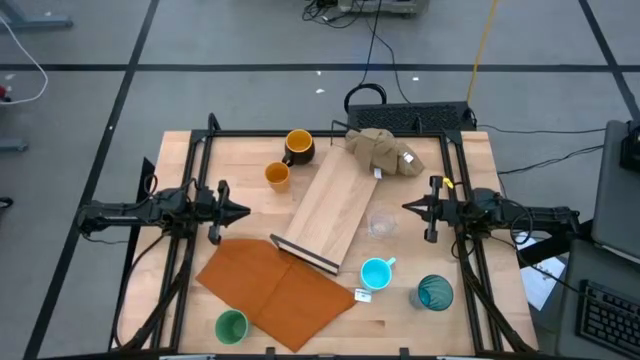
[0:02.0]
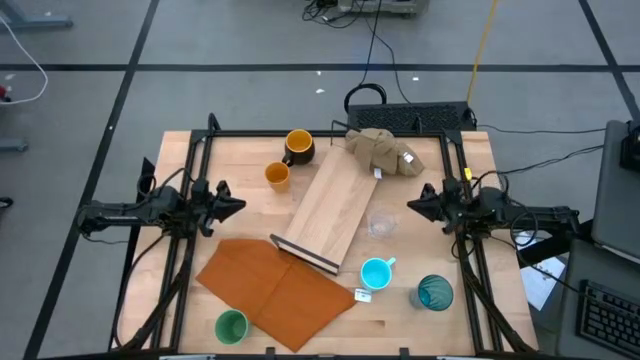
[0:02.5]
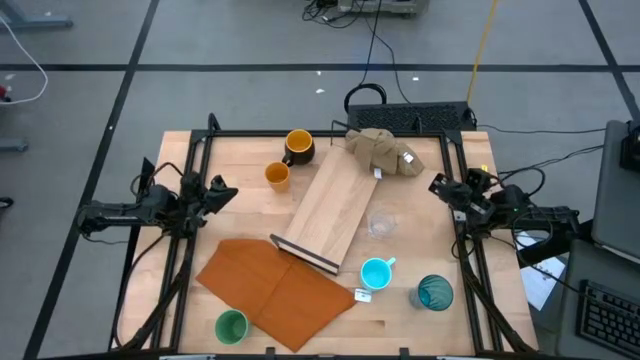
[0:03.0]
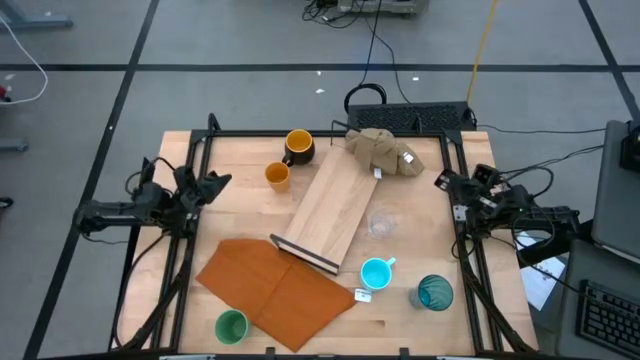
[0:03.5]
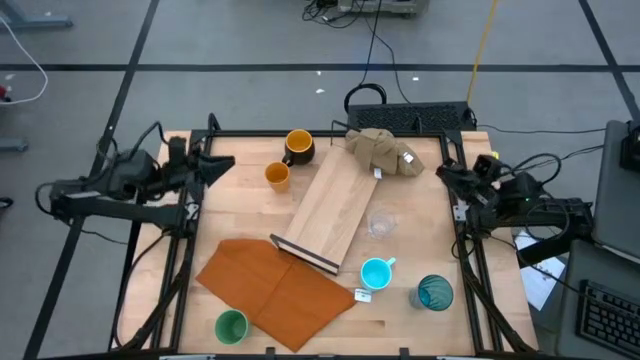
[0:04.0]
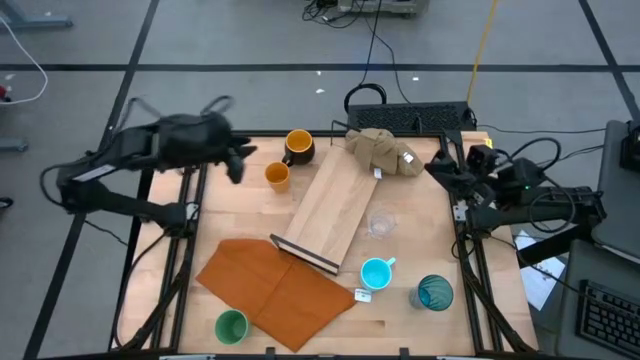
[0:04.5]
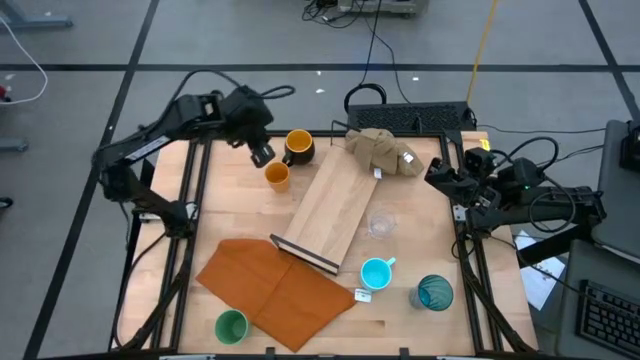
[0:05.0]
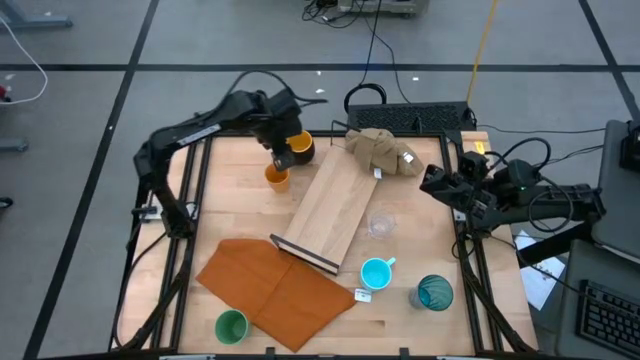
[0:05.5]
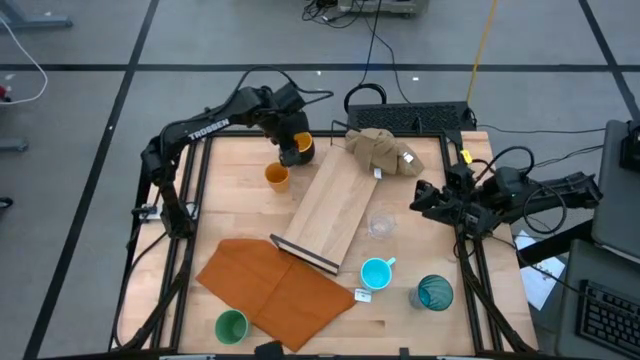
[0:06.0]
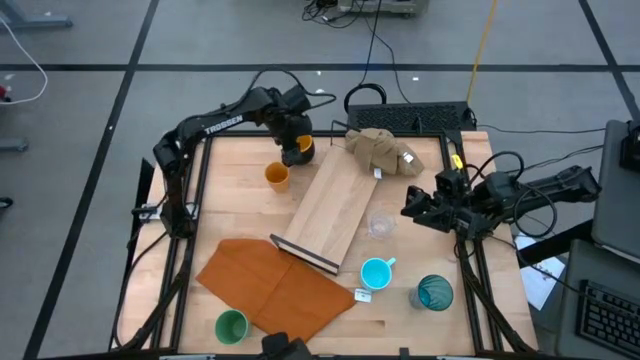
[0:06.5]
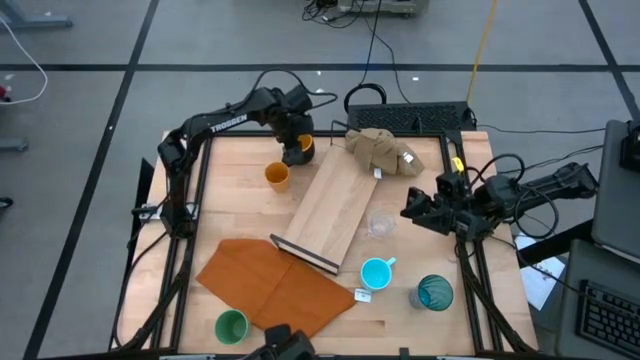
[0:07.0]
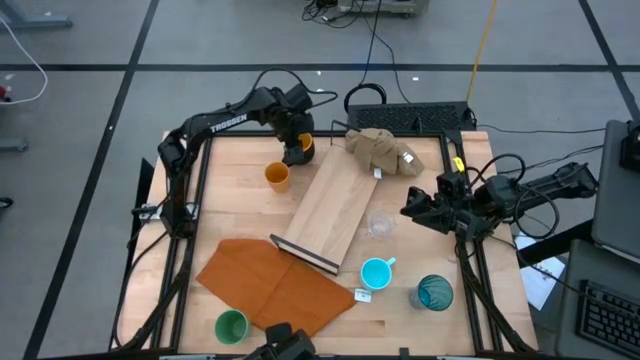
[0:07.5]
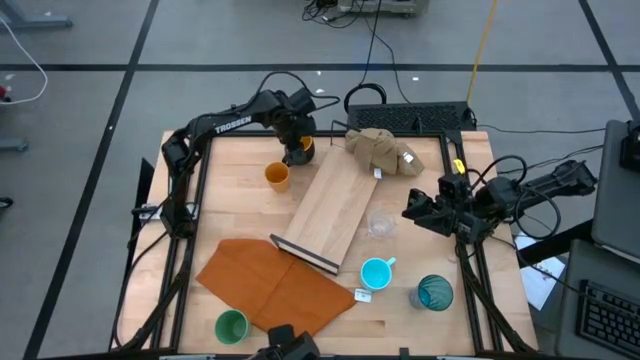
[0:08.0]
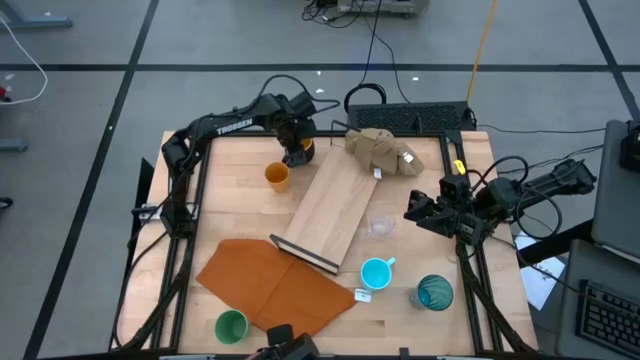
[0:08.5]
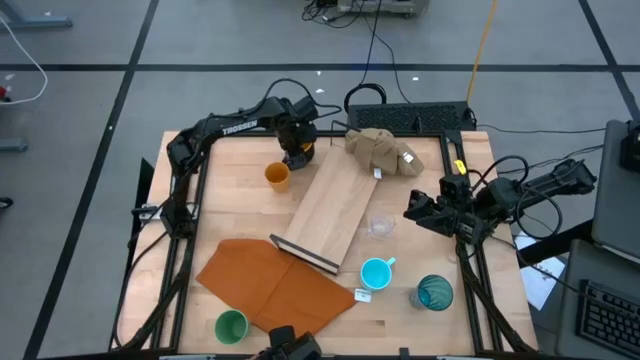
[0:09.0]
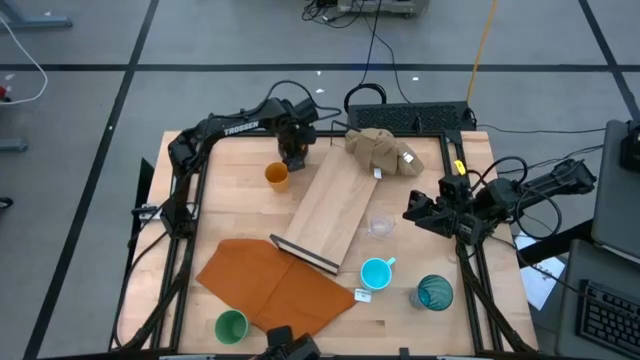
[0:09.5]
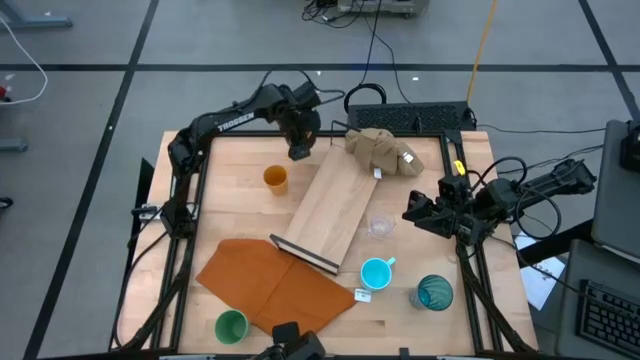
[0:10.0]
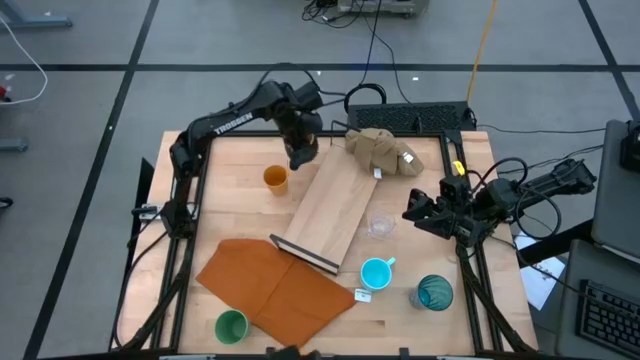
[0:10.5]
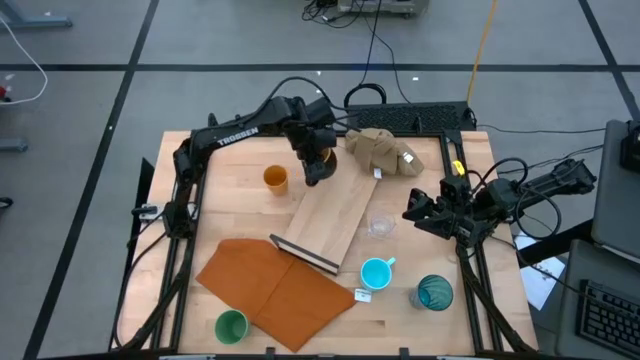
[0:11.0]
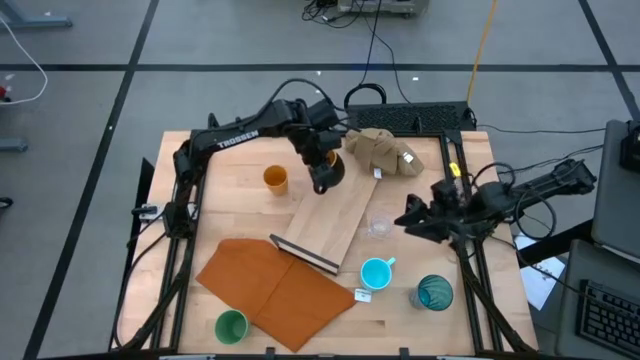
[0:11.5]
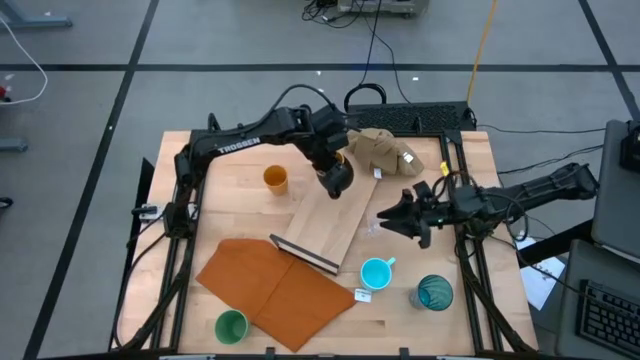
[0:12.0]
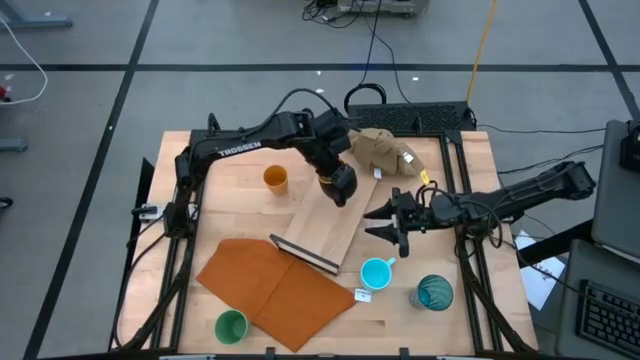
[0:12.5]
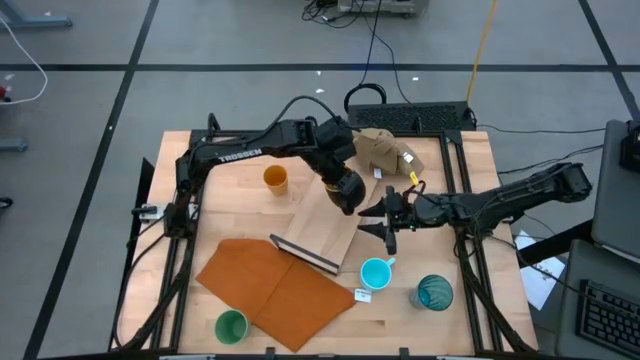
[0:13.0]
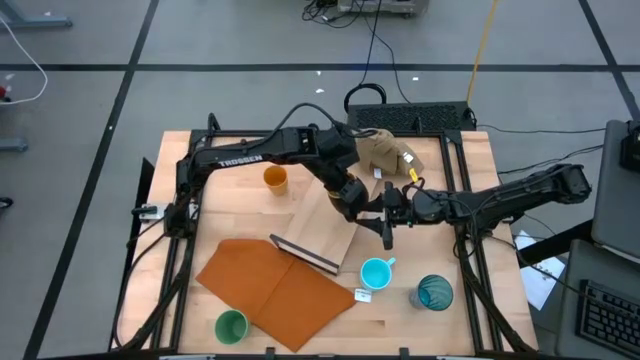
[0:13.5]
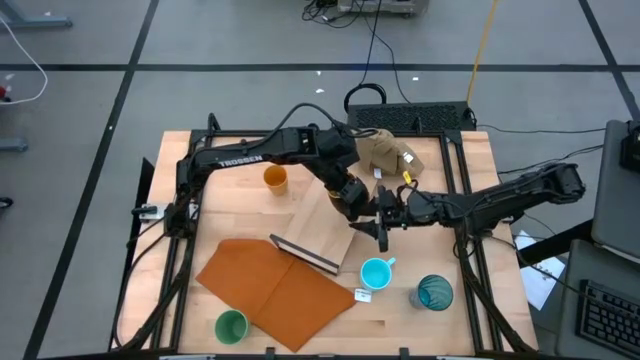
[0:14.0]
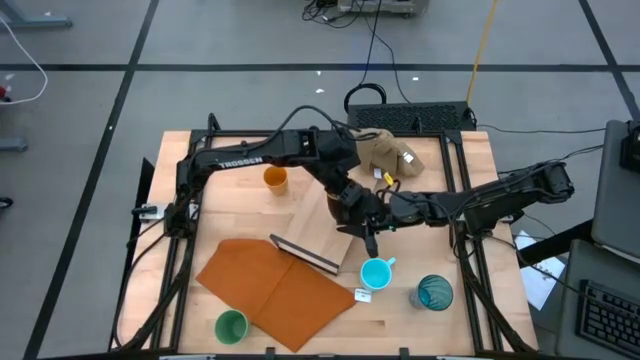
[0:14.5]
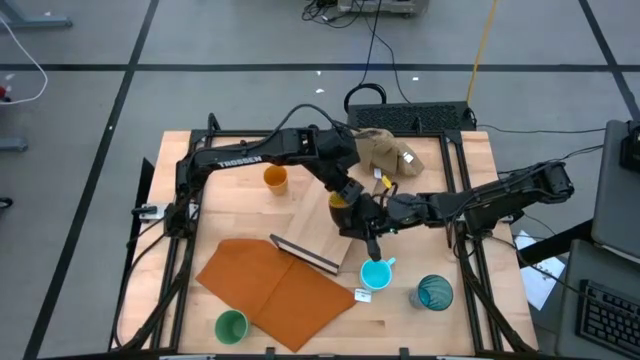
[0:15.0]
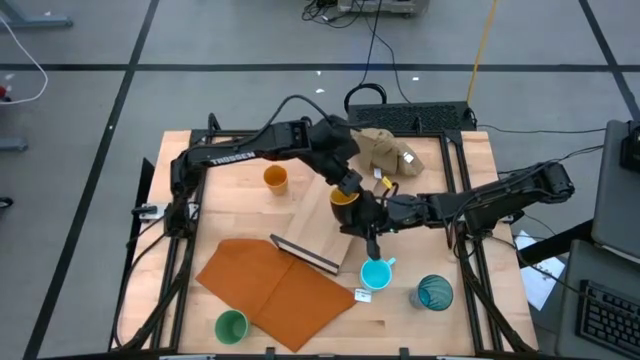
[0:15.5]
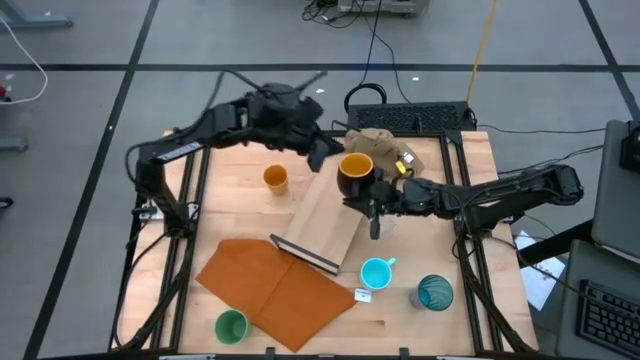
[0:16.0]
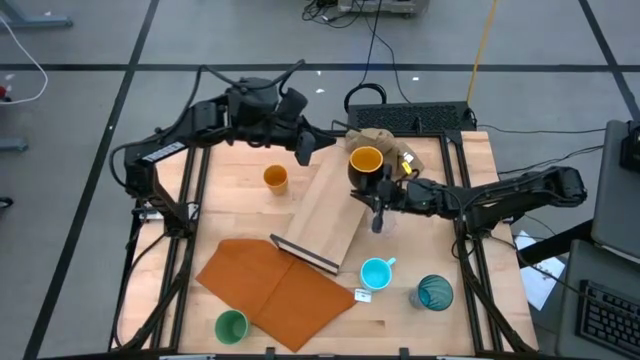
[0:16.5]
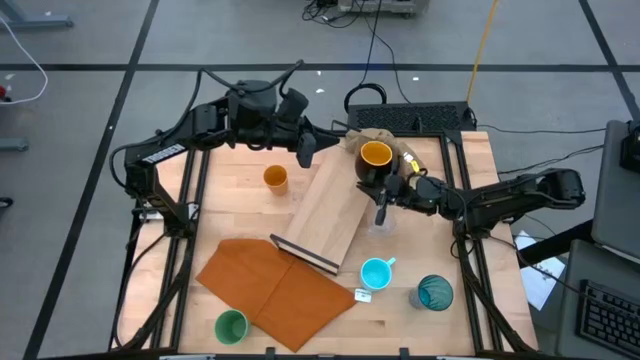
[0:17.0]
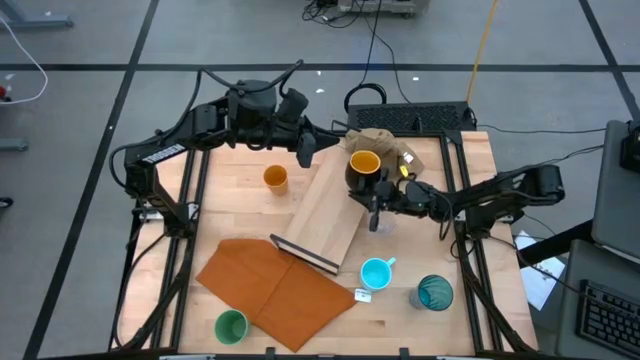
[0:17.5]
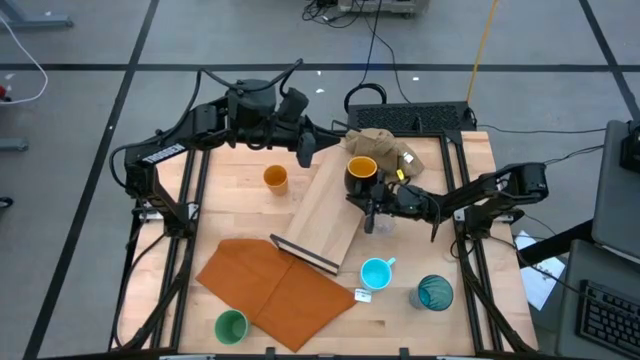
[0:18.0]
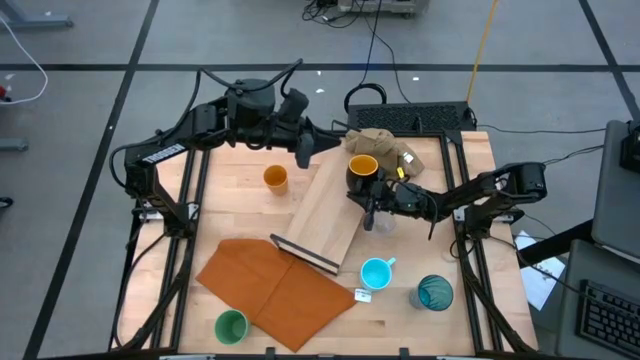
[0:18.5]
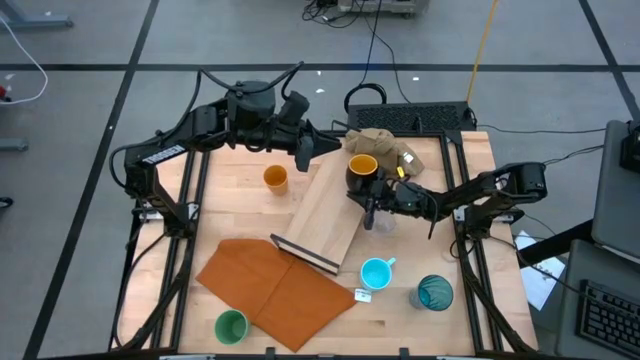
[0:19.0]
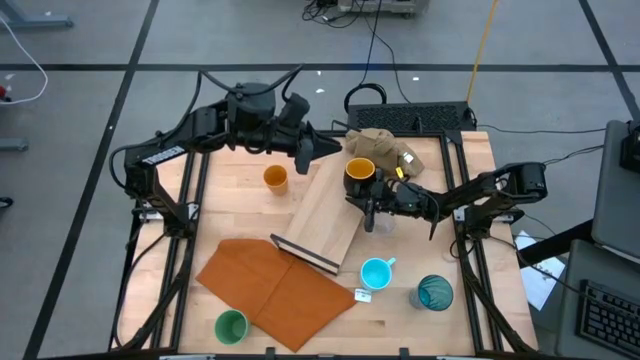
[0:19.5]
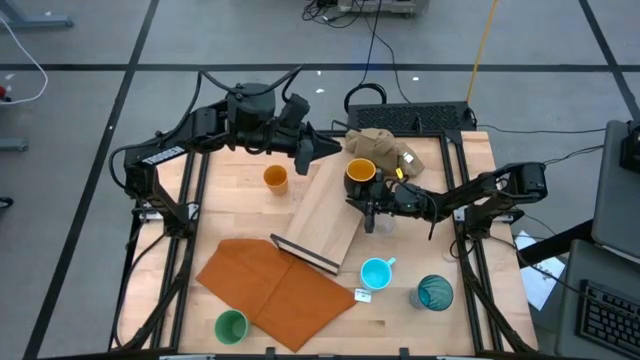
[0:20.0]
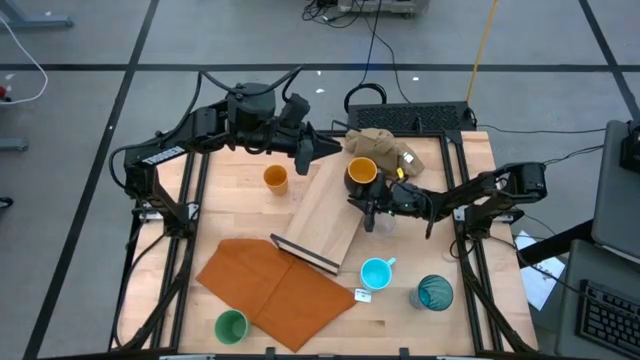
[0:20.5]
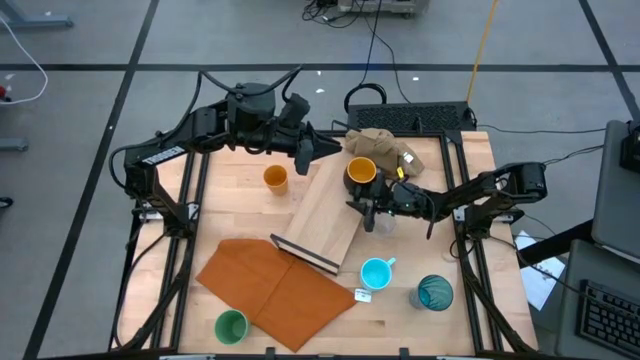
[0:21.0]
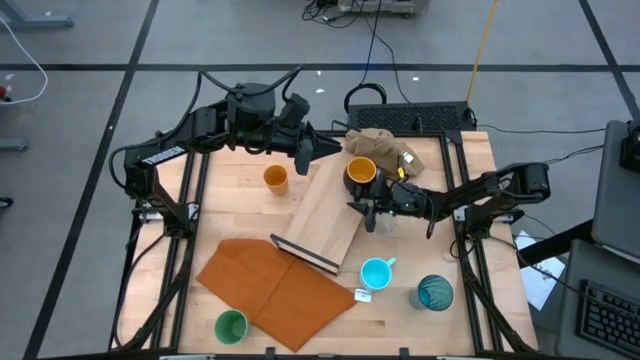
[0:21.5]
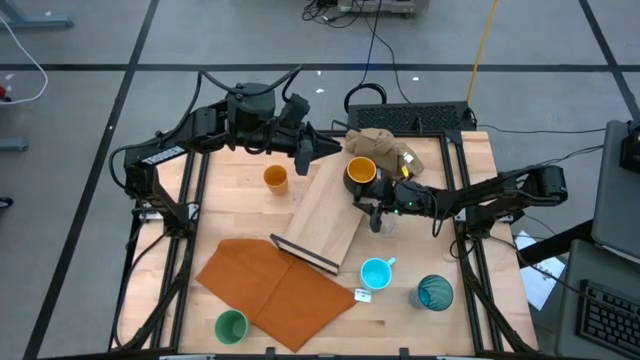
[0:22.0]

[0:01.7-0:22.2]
Task: Stack small to large cups/mugs on shelf
Put the black mug on the shelf
